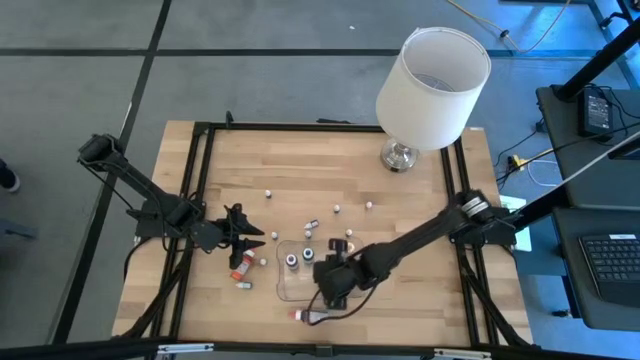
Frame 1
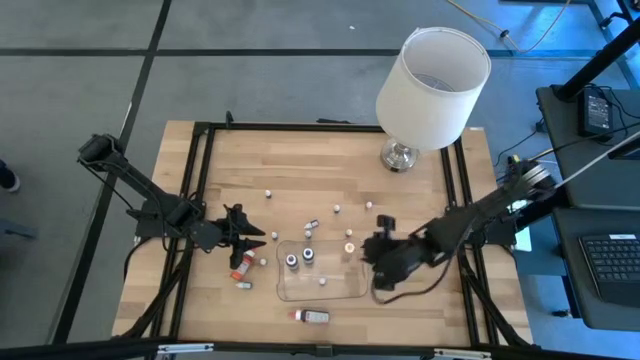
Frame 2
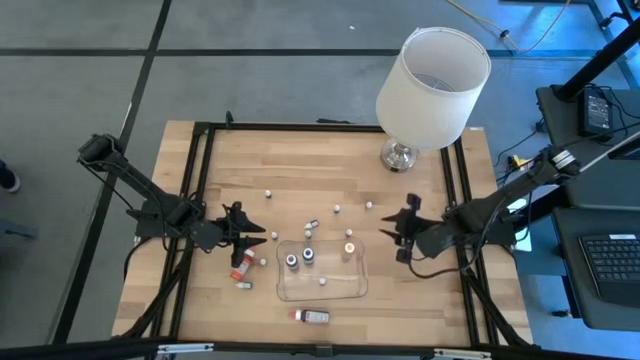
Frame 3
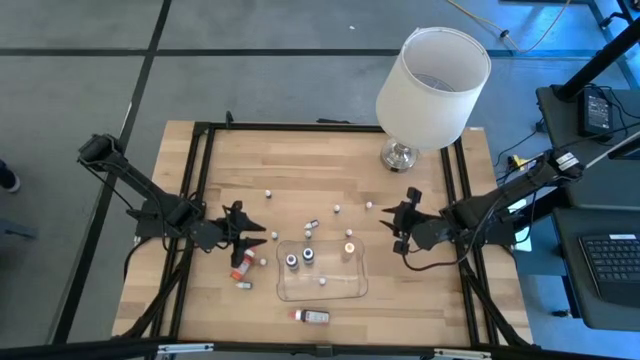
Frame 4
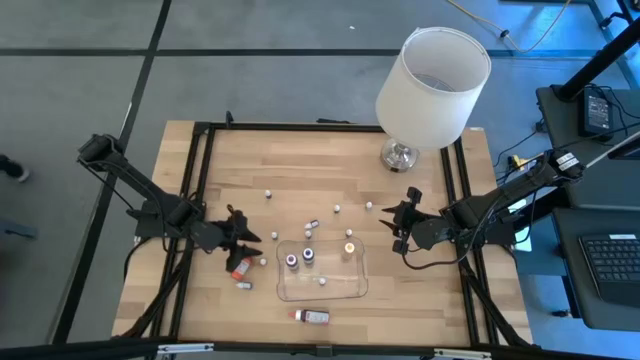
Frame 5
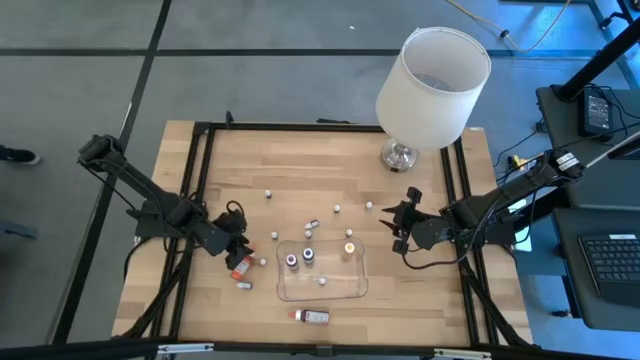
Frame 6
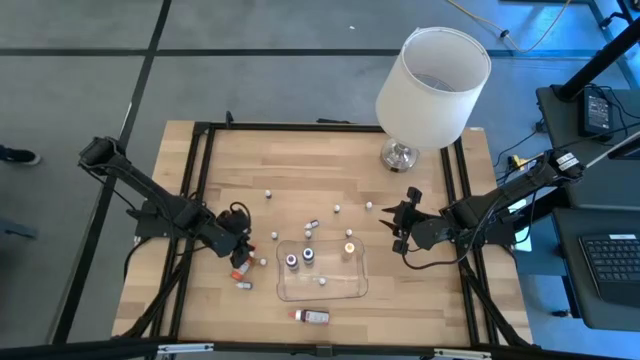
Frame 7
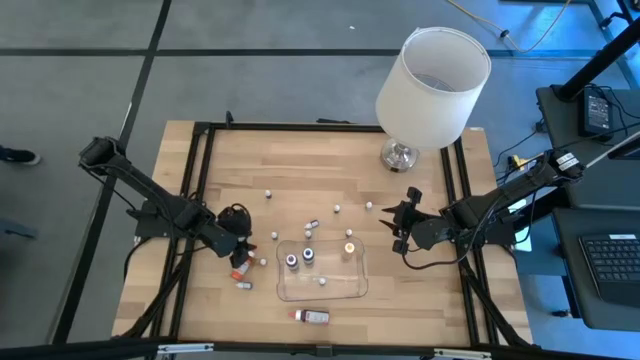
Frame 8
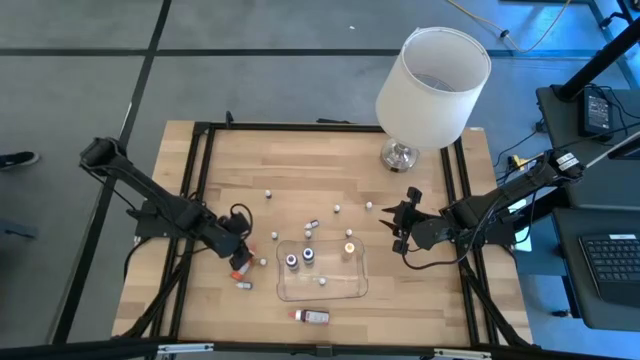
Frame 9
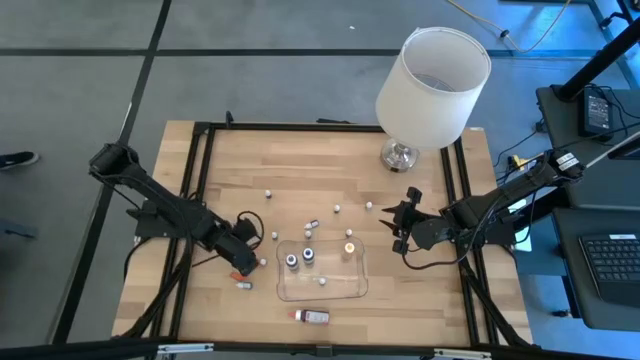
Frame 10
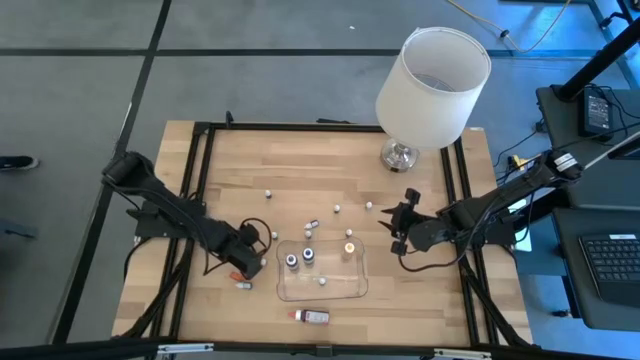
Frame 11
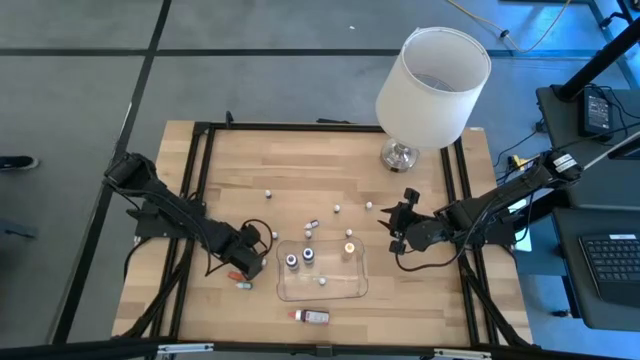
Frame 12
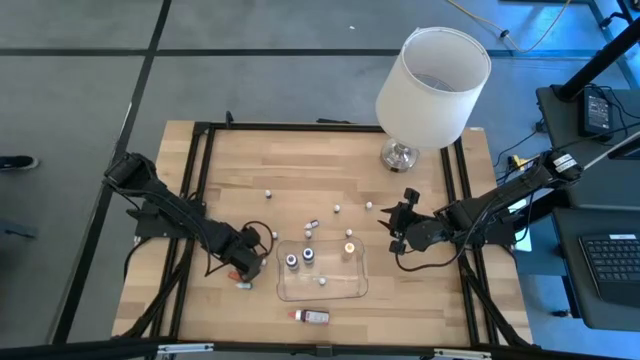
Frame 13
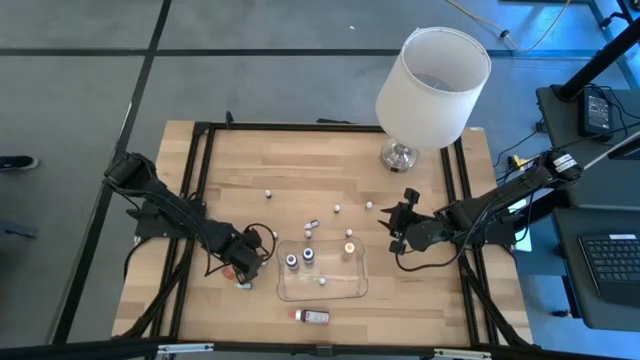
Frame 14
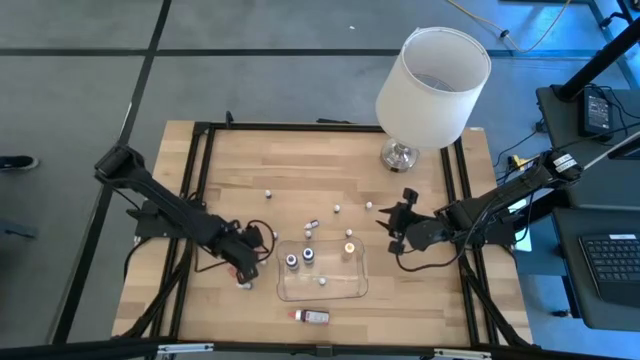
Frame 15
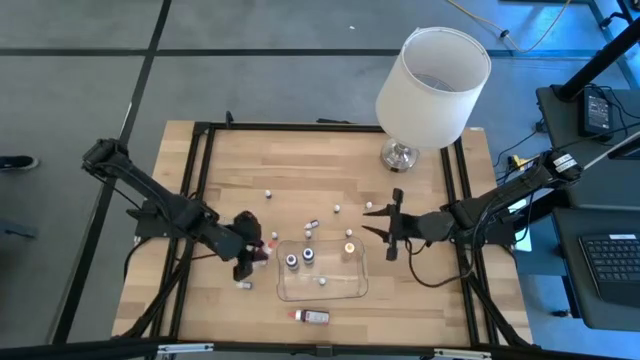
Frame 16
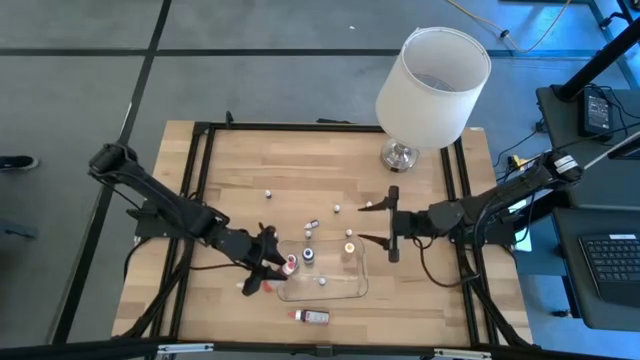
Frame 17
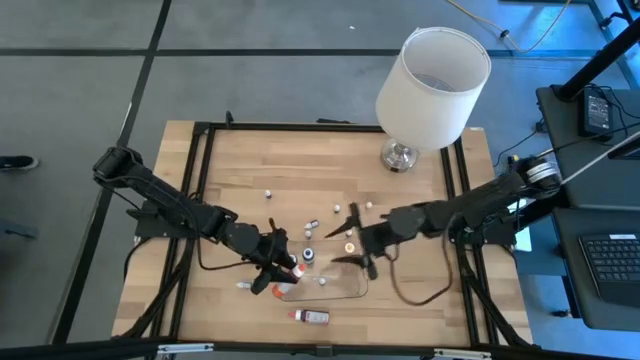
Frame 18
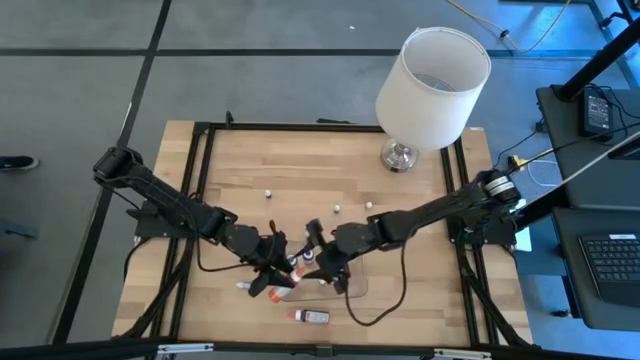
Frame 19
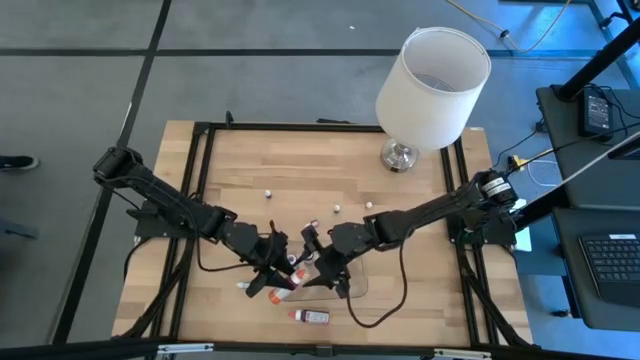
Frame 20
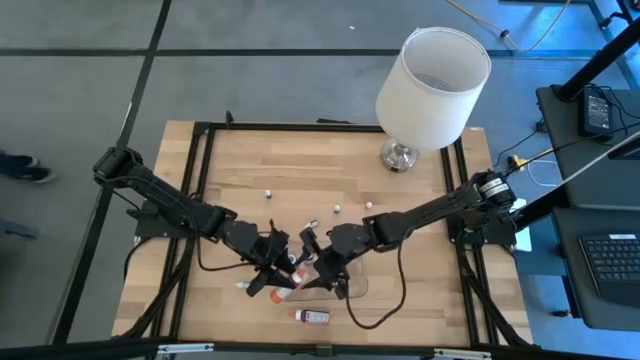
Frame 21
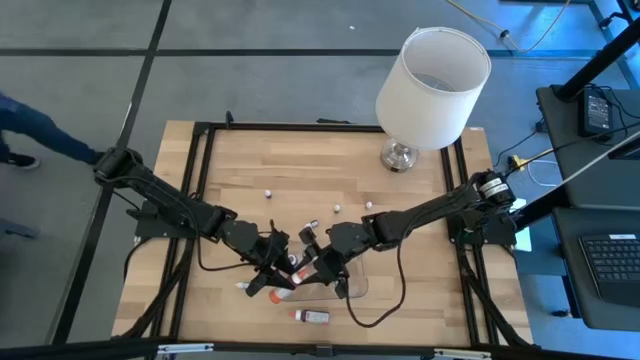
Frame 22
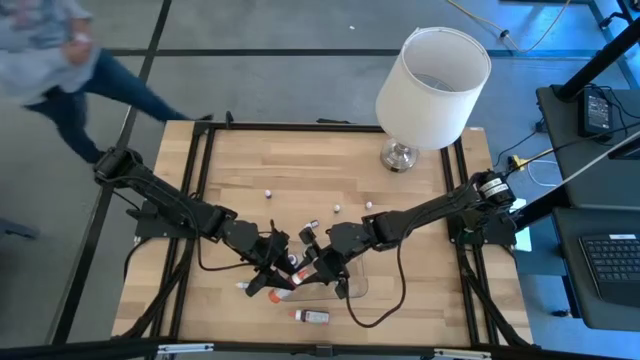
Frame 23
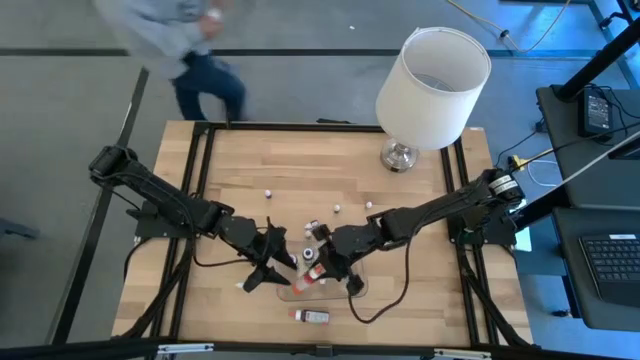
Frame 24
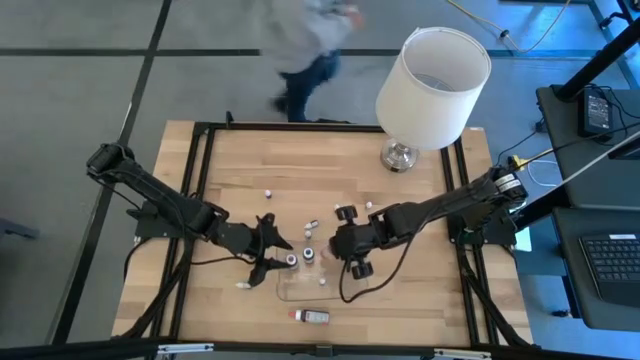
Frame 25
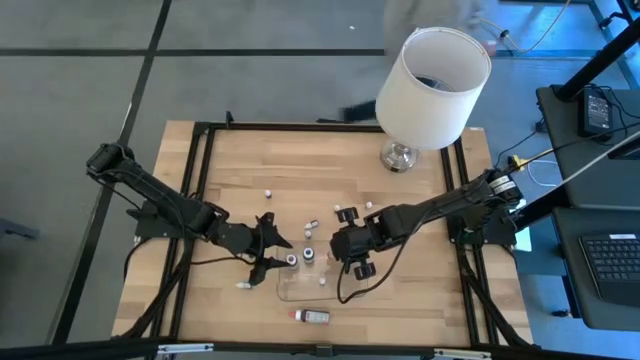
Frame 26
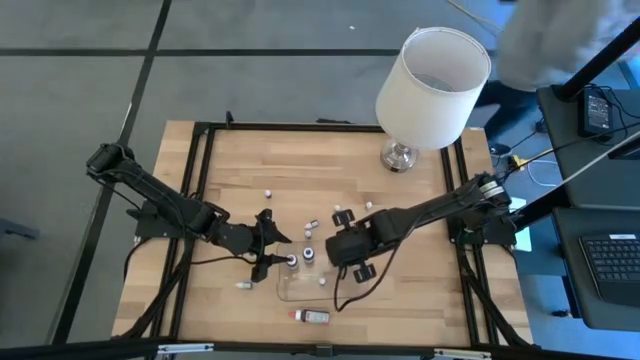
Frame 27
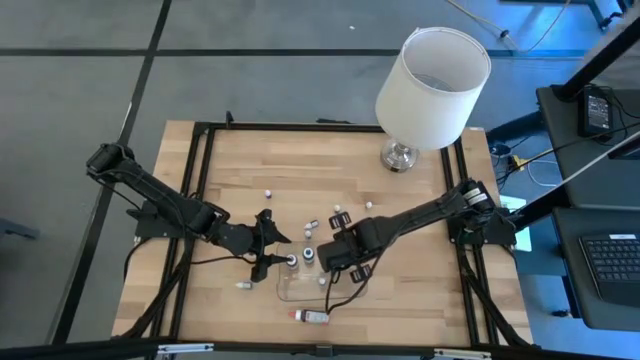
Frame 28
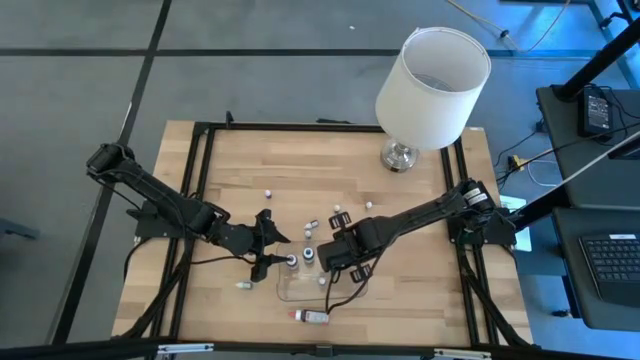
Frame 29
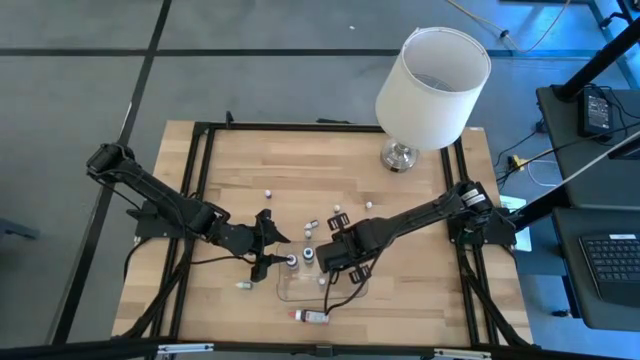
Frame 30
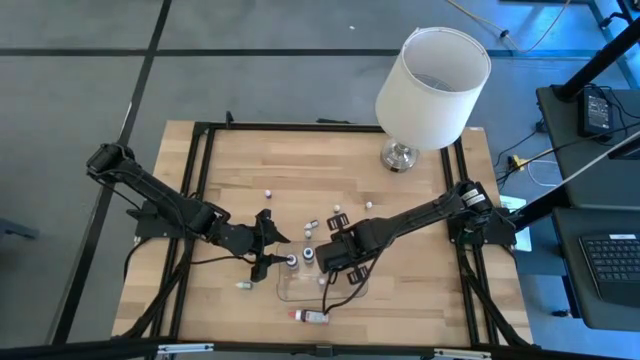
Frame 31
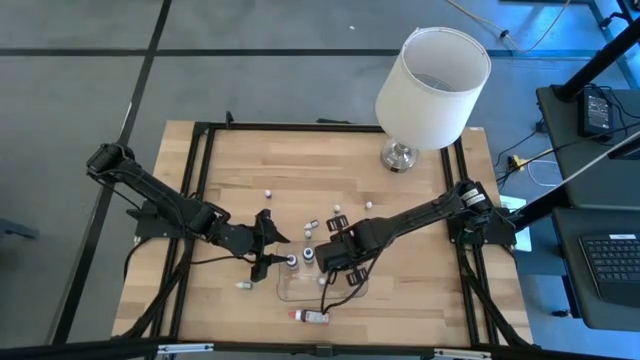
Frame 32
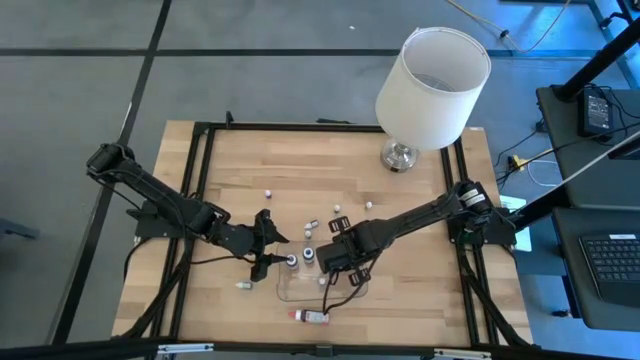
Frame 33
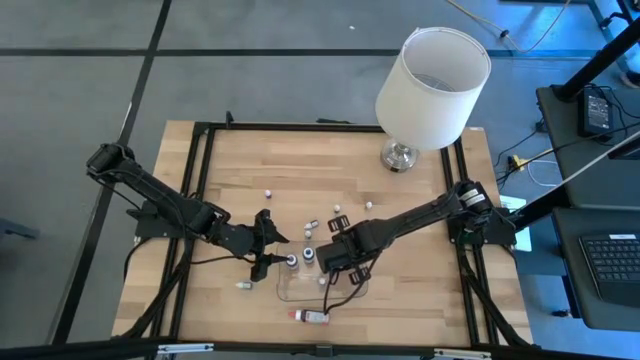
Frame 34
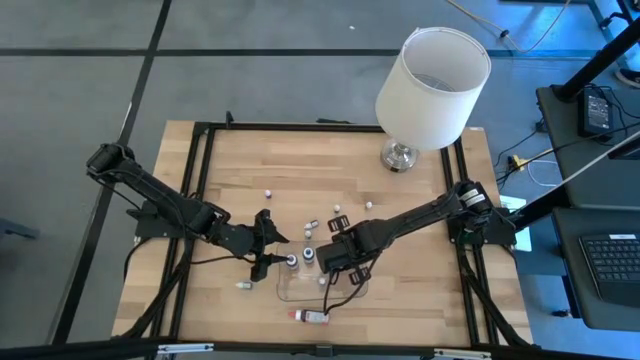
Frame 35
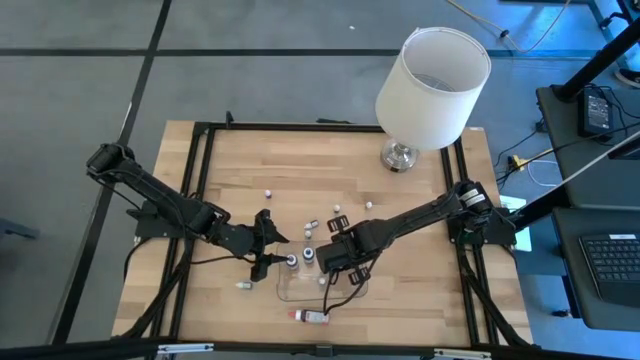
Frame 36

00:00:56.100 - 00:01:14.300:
Task: Pick & Place food coloring
Put the big orange food coloring bottle into the container

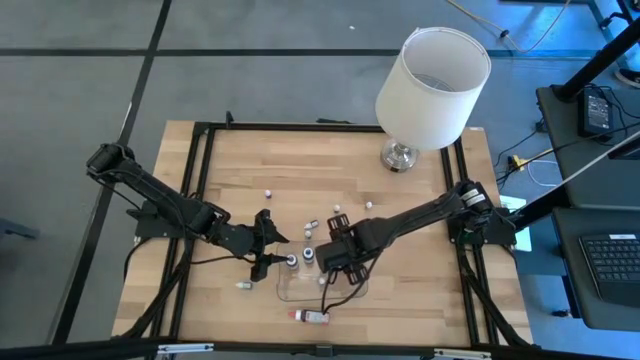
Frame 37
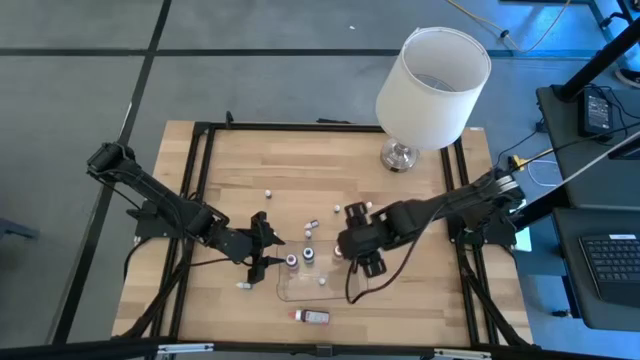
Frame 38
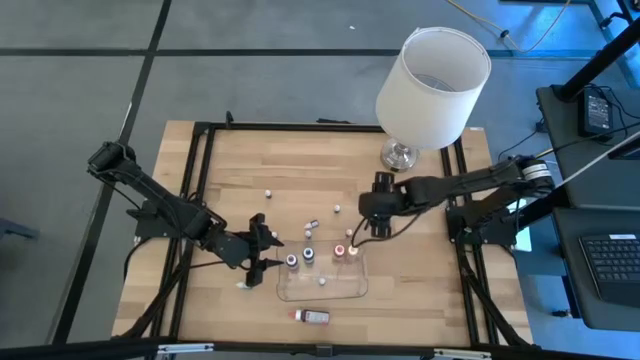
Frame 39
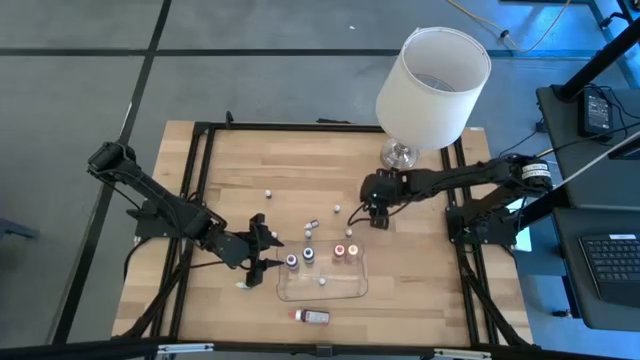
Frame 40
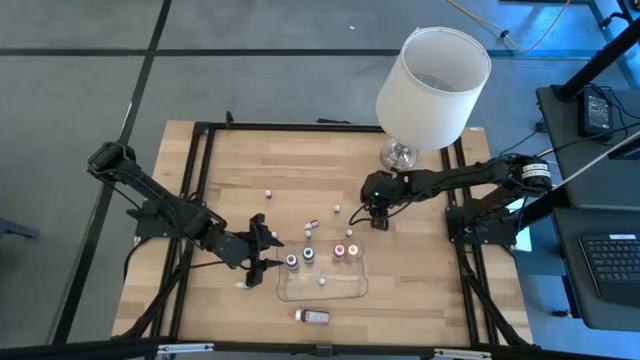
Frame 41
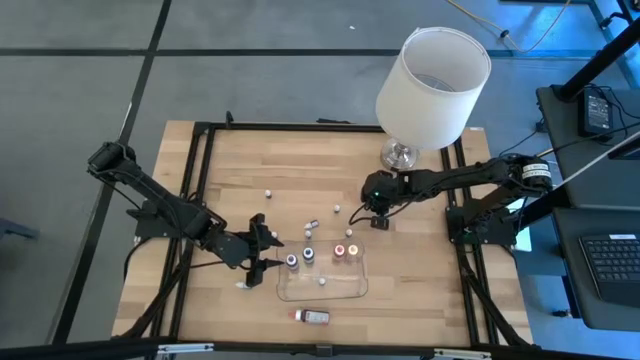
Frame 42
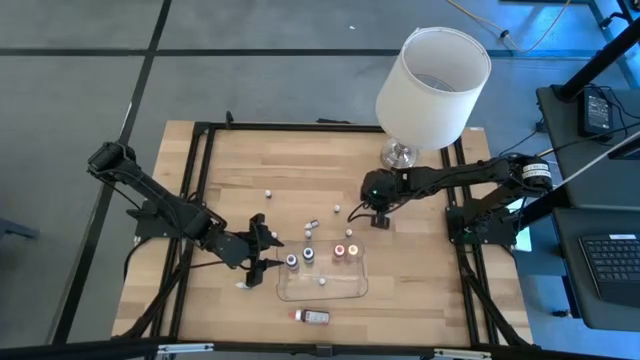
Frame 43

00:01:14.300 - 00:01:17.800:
Put the small green food coloring bottle into the container

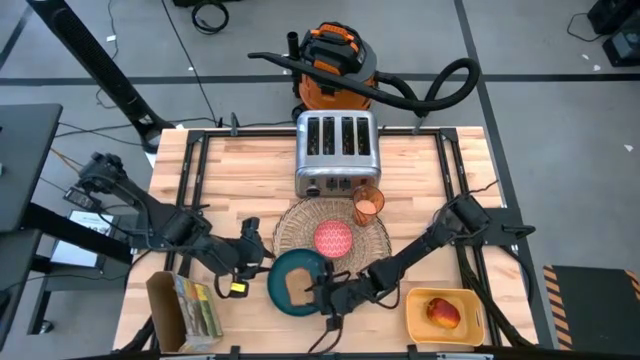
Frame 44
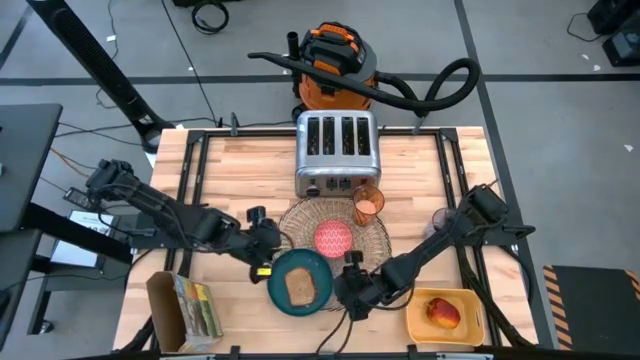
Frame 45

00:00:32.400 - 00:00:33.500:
Task: Arrange a breakfast setting
Adjust the blue plate on the brown placemat
